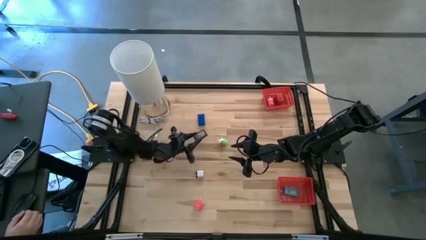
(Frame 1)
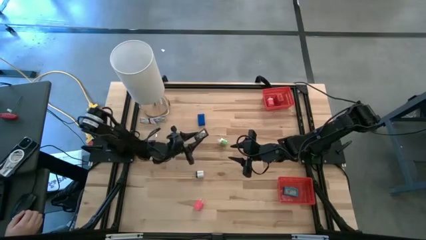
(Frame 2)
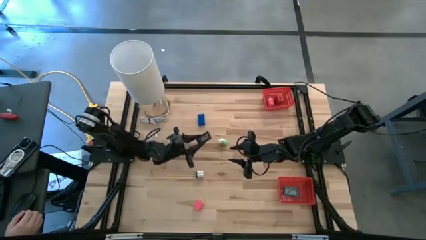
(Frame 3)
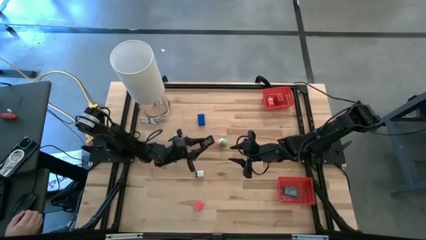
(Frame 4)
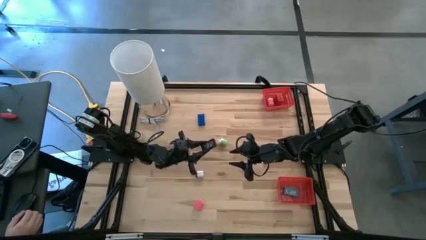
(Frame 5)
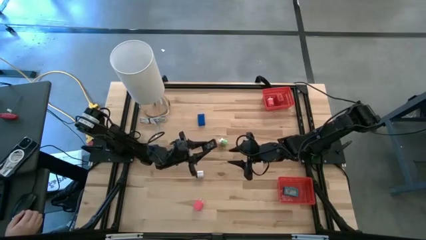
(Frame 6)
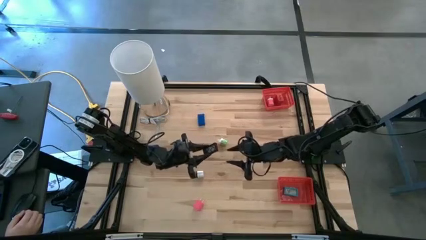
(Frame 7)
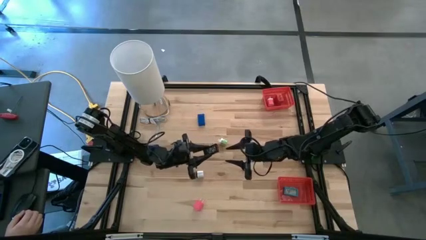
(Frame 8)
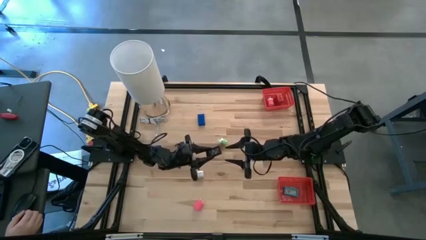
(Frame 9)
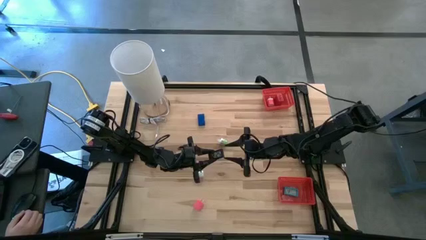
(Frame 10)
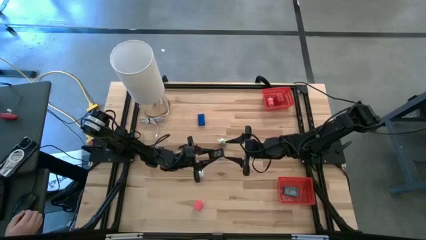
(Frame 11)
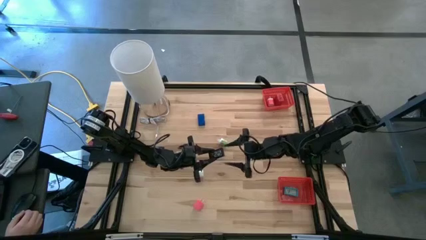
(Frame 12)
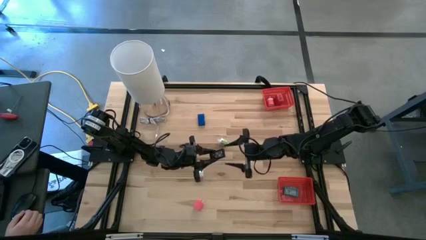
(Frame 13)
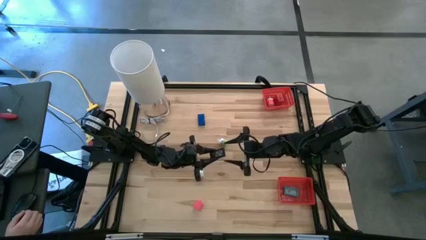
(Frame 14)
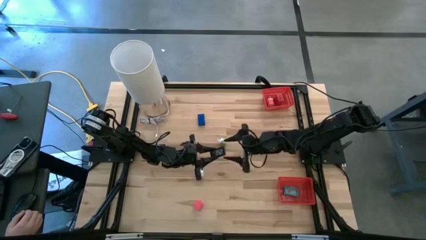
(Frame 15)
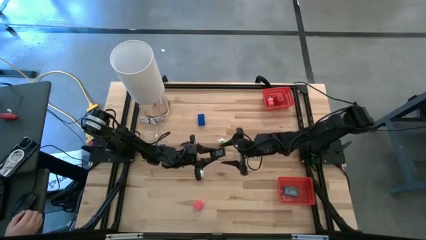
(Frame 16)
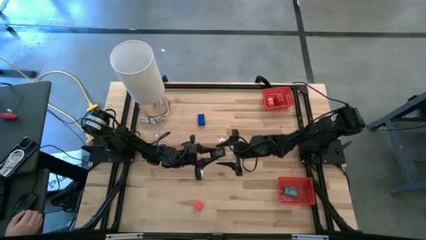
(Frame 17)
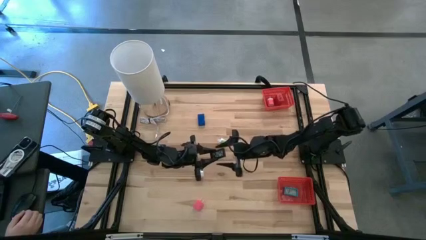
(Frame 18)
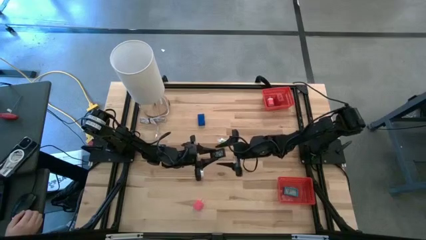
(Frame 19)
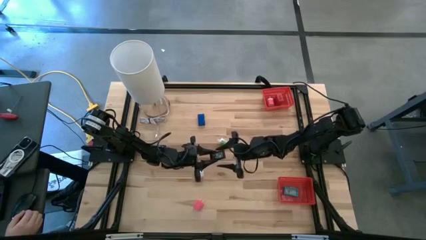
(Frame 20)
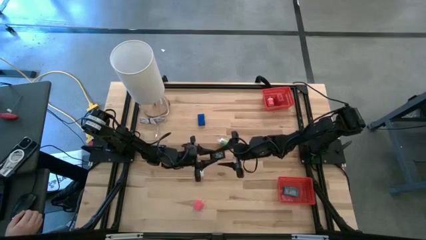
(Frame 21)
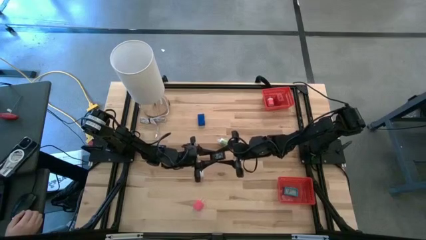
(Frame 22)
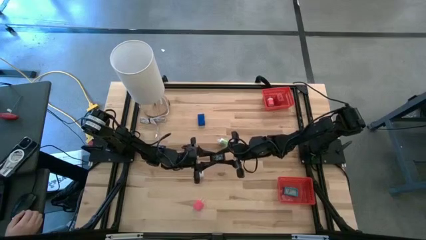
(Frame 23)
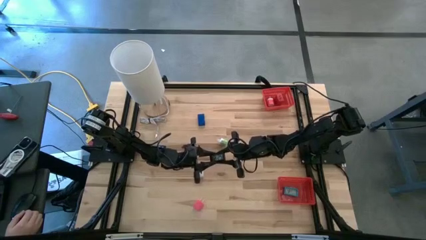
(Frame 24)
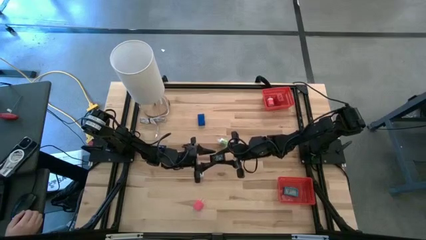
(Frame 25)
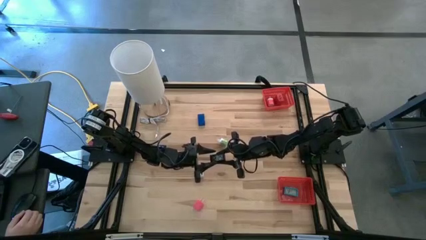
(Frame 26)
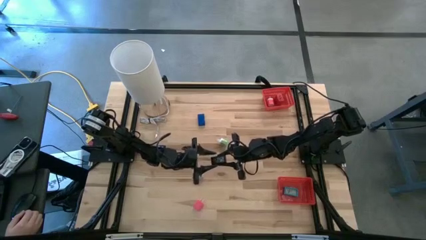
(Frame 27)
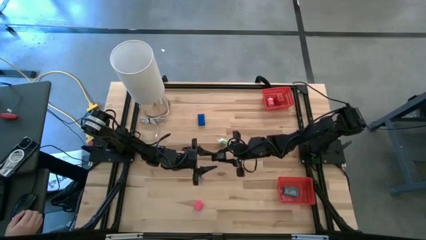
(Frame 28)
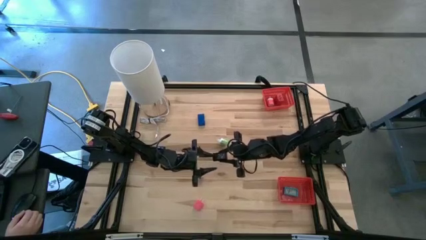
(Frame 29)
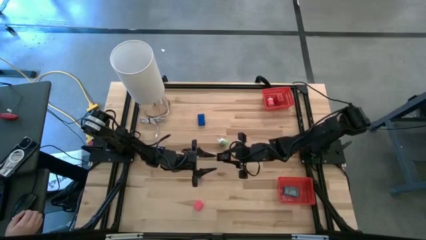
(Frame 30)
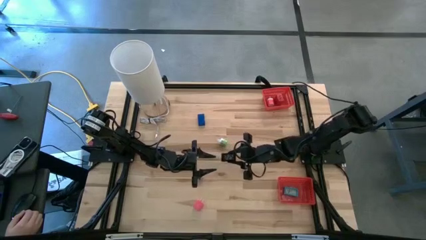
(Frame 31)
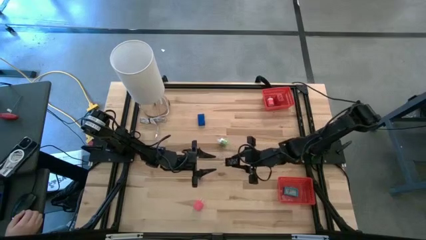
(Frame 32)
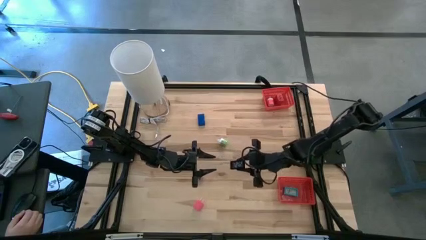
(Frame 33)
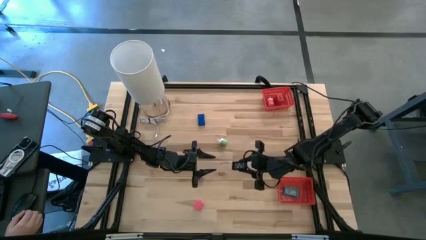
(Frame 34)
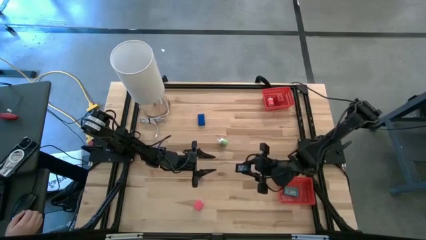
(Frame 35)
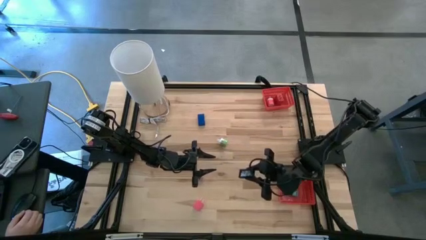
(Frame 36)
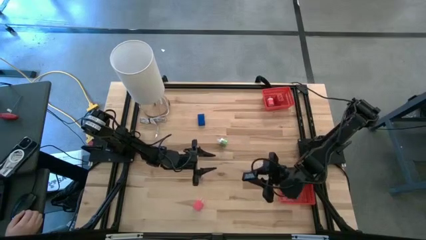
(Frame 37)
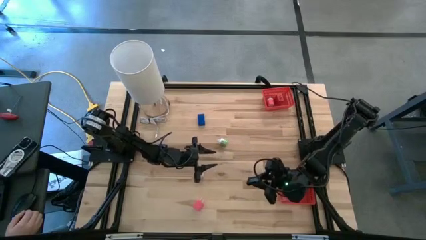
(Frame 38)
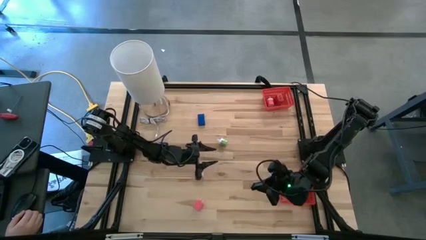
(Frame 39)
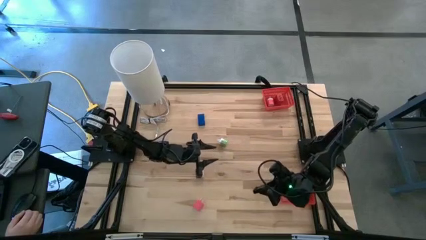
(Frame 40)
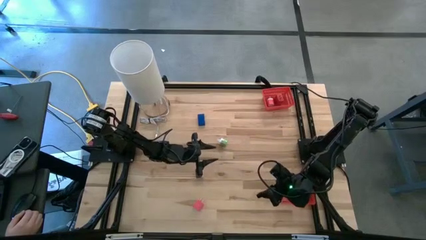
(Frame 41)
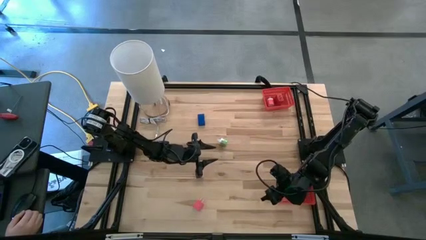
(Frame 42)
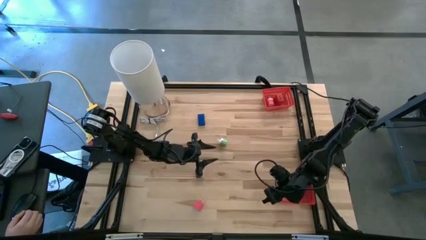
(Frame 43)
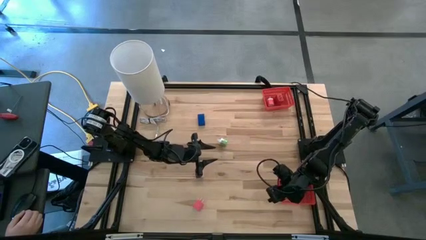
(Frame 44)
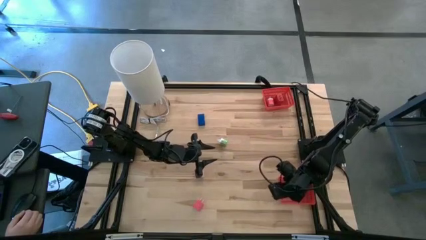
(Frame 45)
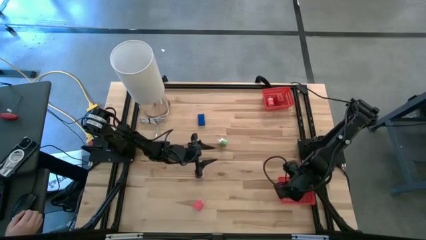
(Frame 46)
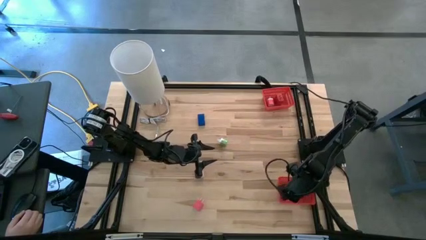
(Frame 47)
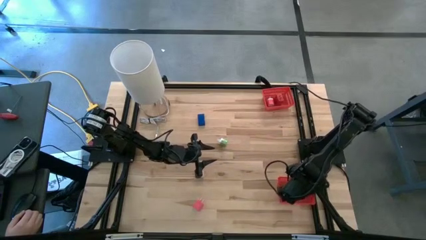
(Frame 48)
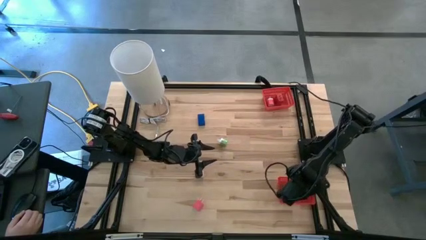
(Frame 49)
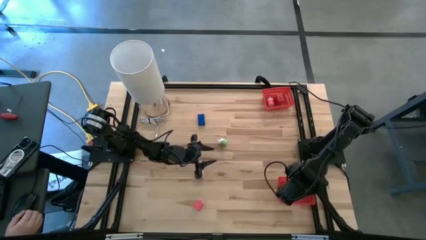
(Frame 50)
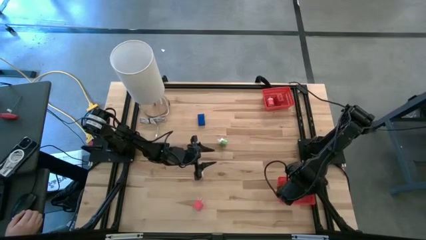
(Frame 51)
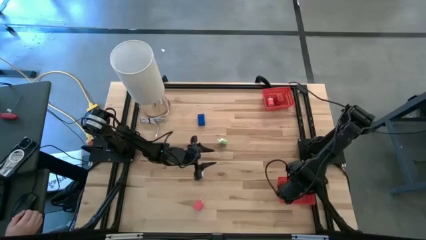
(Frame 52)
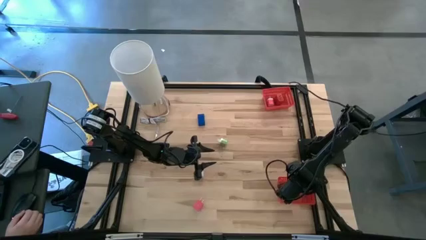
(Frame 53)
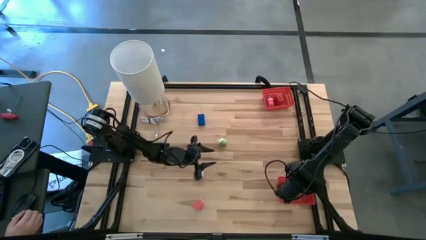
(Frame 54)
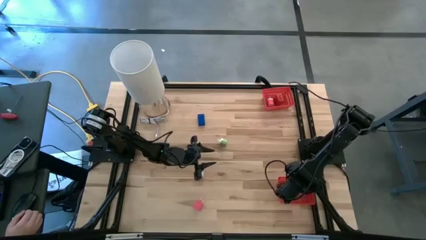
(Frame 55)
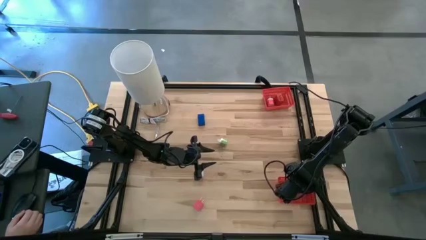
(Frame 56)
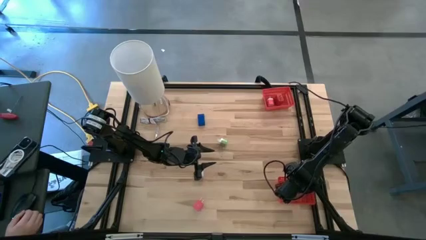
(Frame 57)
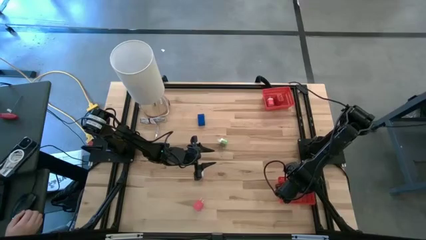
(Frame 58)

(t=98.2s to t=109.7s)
Task: Pick & Place Office items
Put the black digital clock into the bottom red basket
